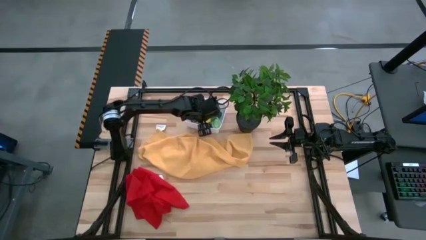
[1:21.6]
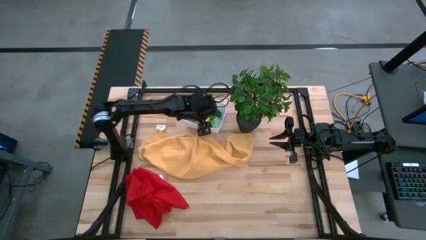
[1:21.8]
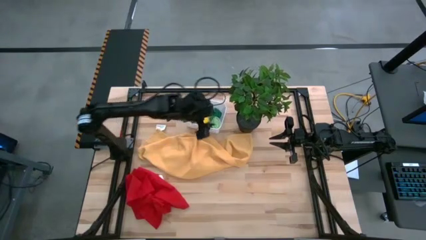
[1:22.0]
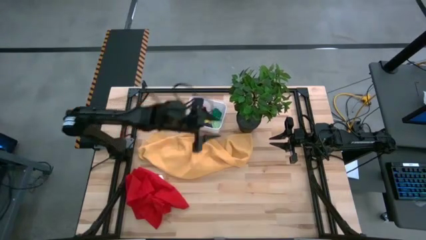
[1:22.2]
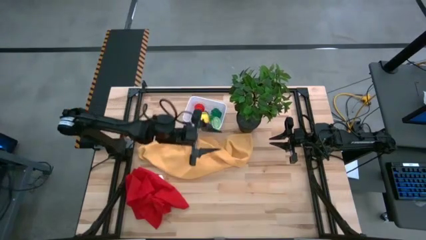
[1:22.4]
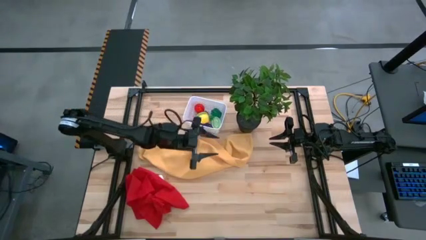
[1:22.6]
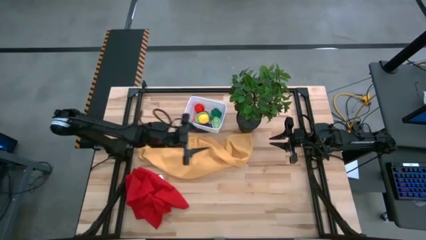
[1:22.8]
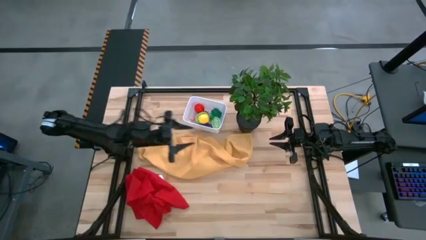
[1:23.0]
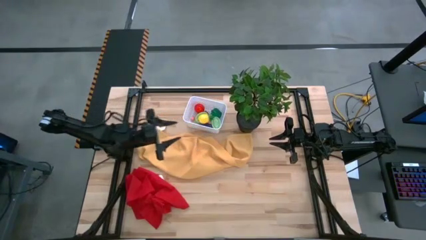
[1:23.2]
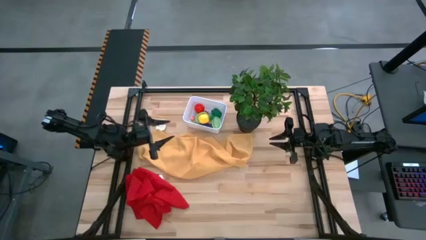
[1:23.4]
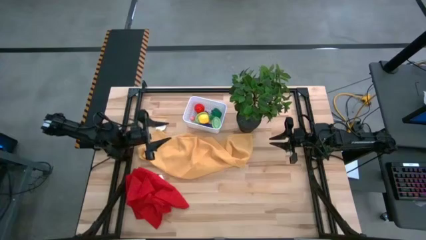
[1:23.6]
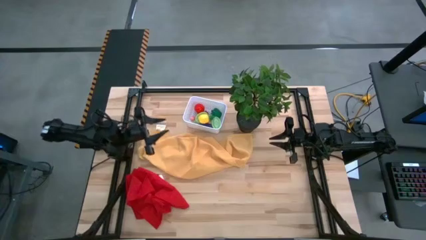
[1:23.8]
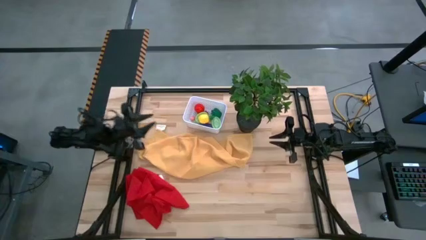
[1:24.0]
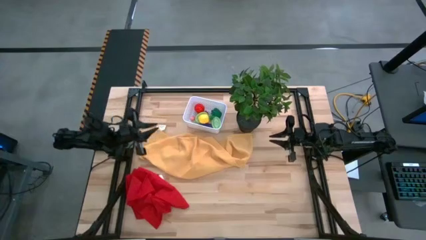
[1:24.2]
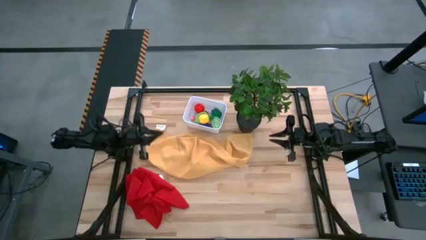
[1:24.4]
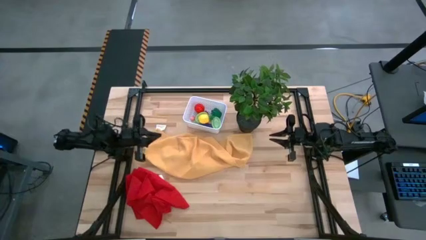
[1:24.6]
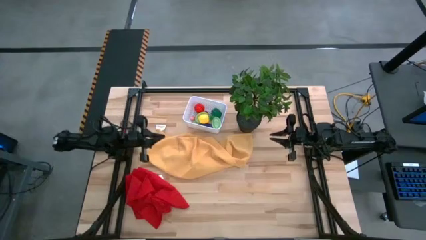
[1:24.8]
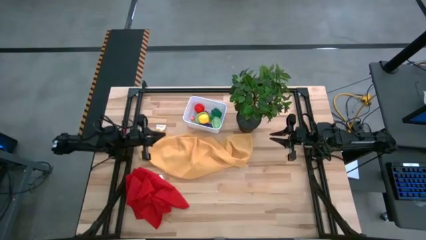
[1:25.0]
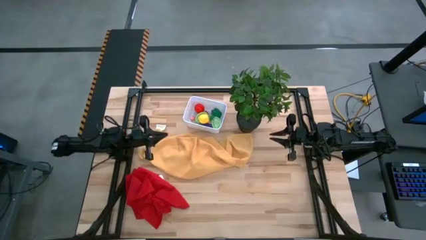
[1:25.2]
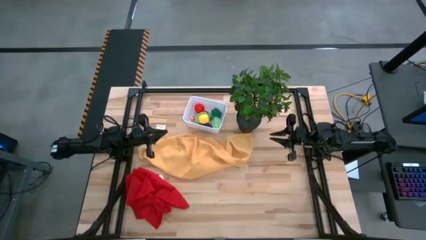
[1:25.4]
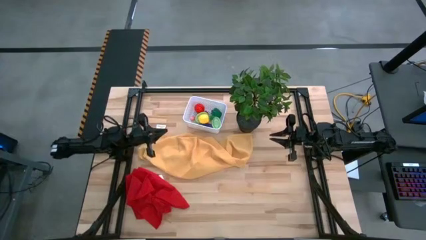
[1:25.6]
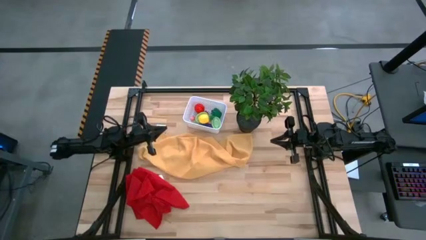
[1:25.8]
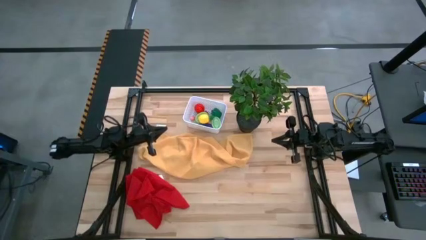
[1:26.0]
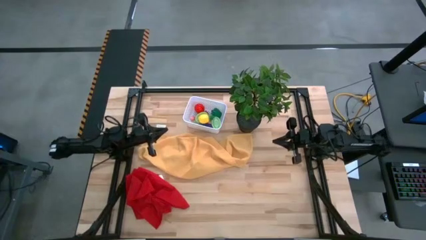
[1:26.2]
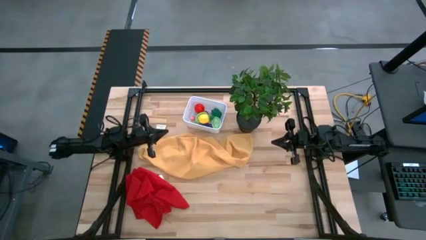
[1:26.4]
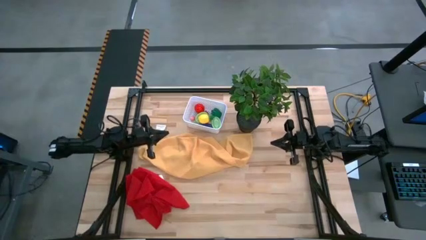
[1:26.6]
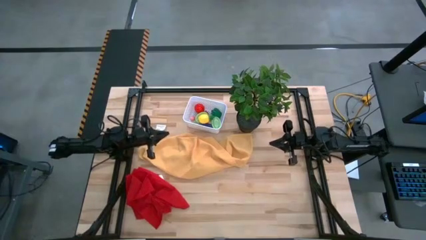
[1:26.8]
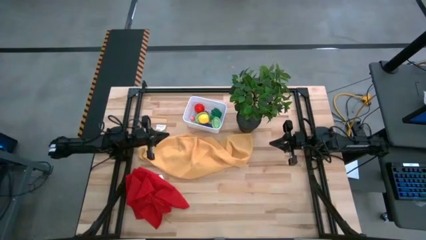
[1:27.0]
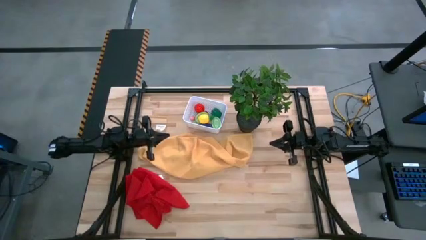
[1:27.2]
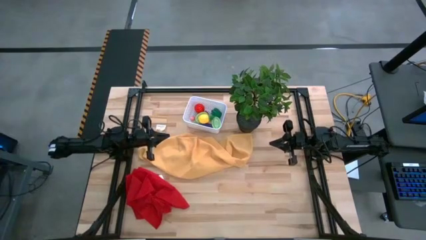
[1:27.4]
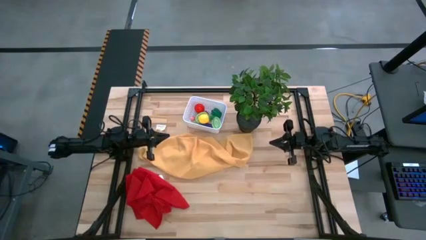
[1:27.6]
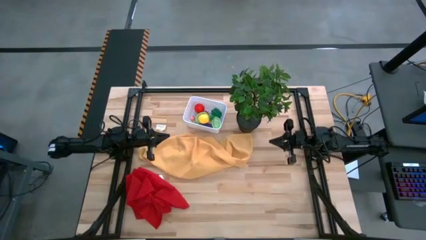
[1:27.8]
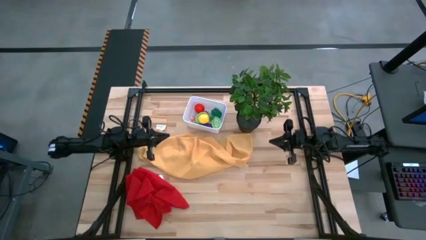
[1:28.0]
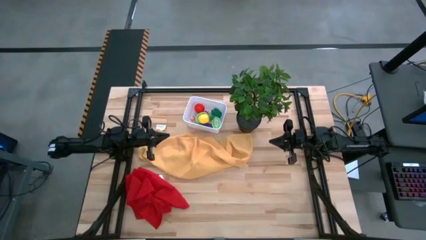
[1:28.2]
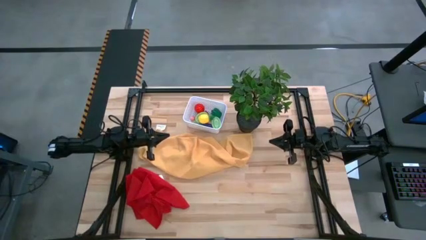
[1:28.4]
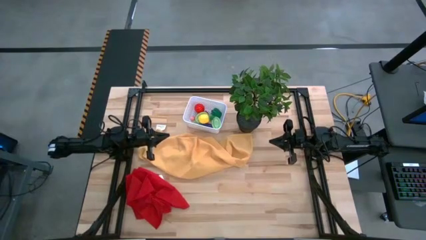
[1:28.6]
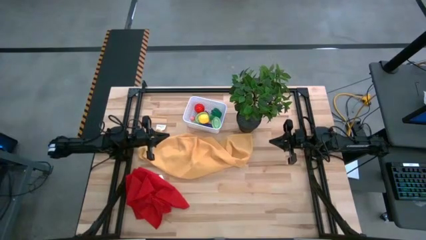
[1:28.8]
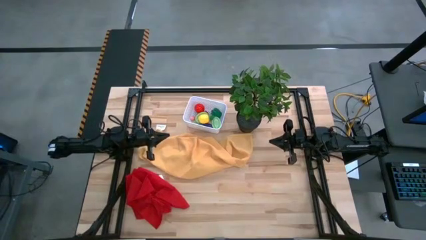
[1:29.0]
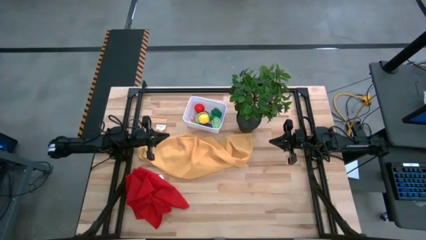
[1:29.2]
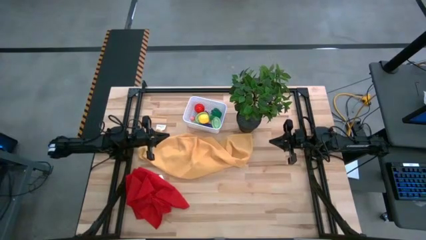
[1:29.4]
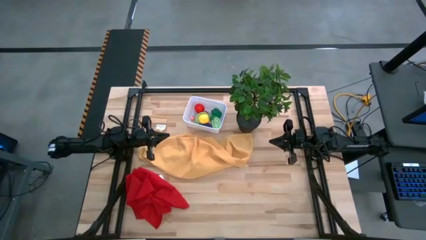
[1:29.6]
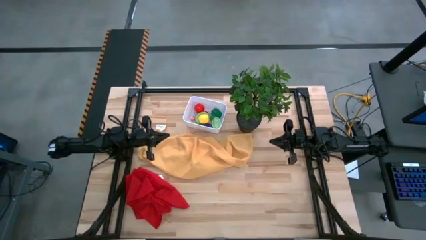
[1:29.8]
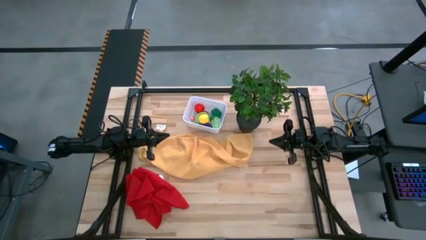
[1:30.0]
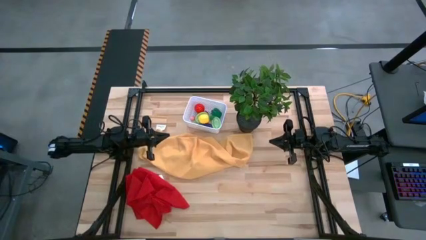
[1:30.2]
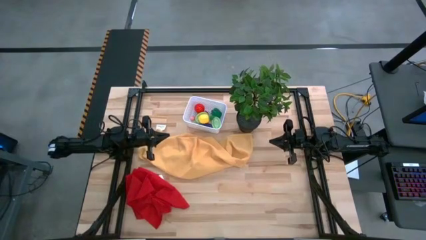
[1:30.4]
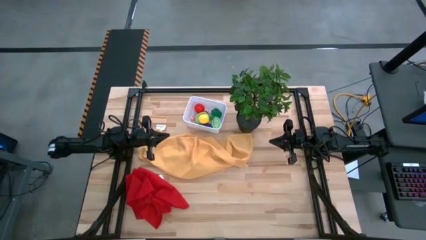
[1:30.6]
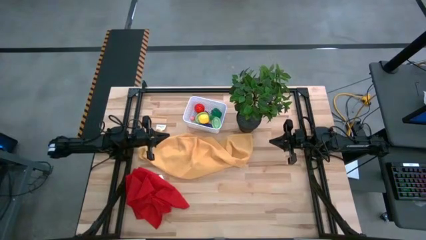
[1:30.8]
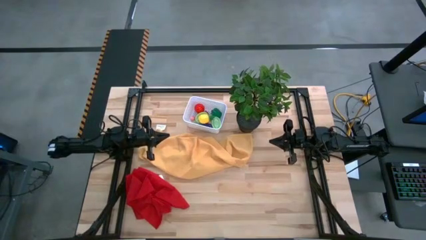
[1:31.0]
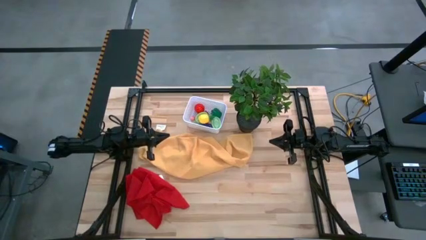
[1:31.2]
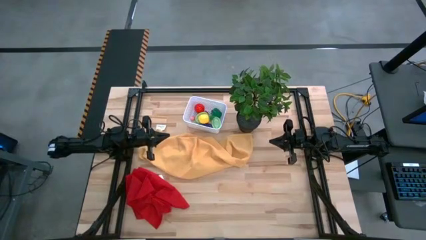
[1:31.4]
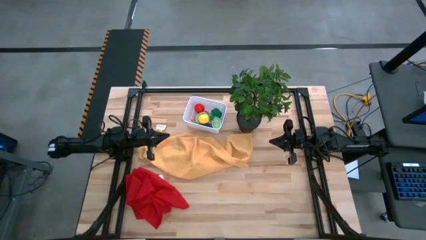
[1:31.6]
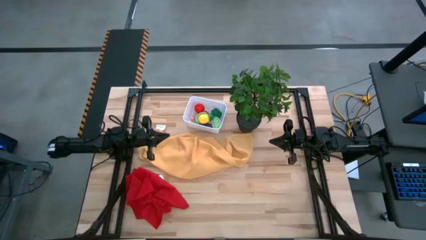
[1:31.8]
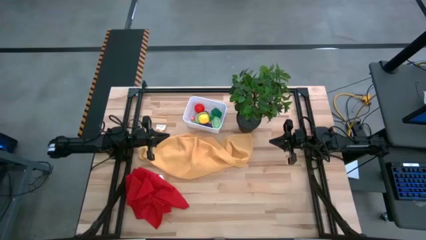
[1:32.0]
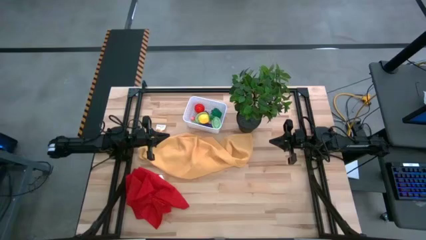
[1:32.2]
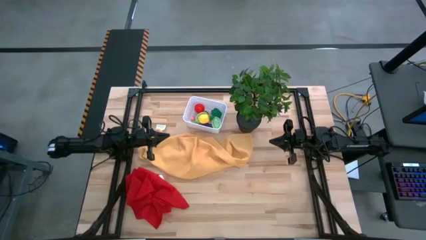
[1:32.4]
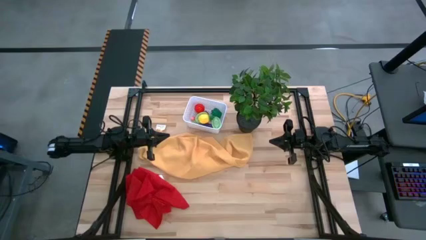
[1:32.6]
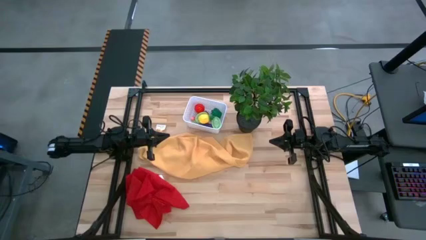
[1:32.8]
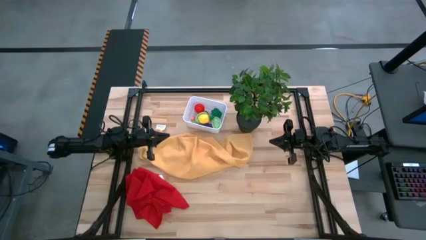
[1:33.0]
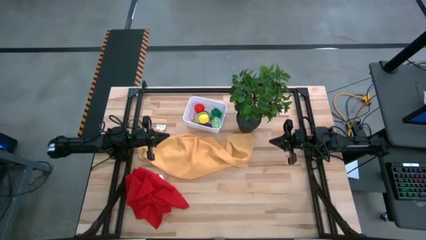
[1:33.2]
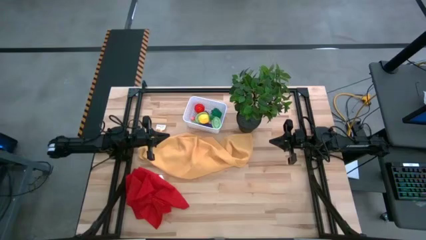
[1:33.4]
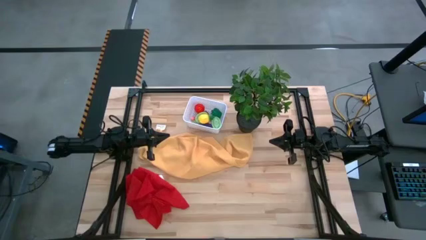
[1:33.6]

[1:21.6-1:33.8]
Task: Pick and placing Produce into tupperware
Return to Home Position
